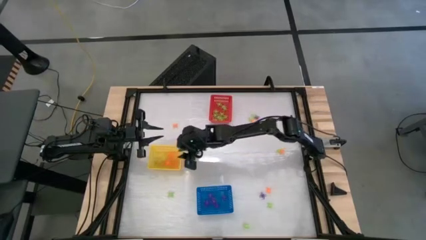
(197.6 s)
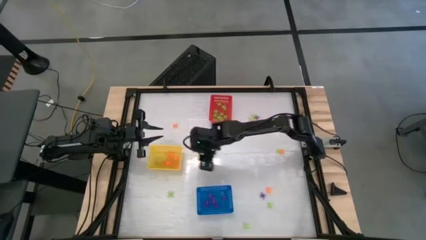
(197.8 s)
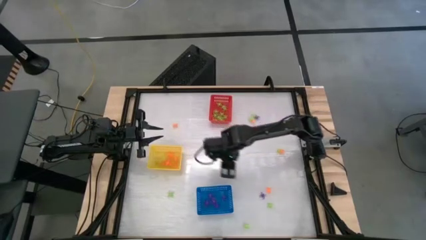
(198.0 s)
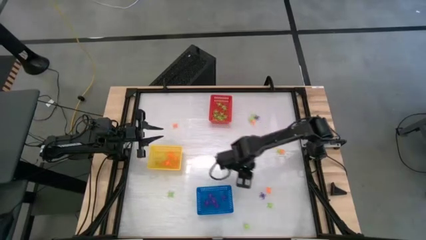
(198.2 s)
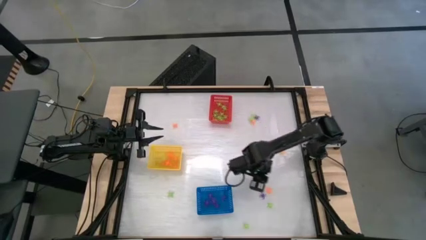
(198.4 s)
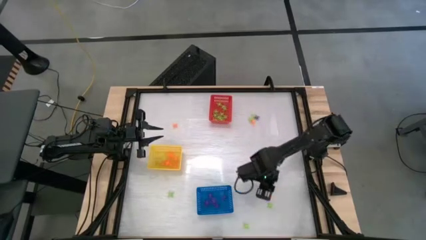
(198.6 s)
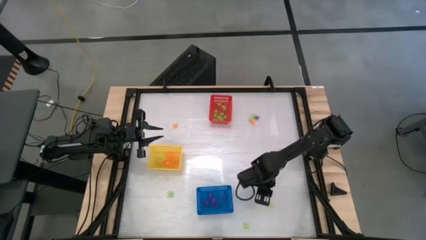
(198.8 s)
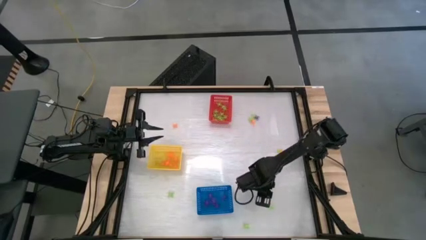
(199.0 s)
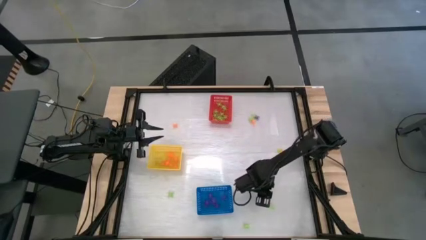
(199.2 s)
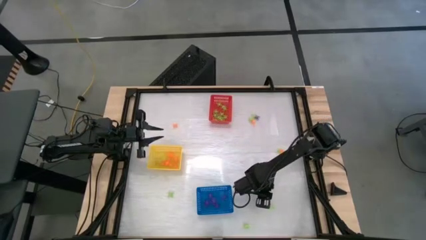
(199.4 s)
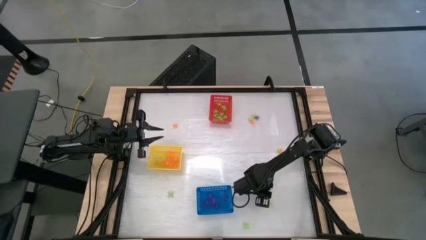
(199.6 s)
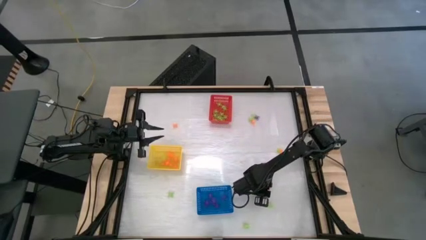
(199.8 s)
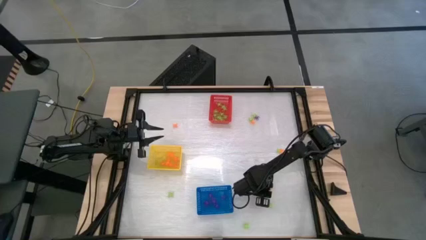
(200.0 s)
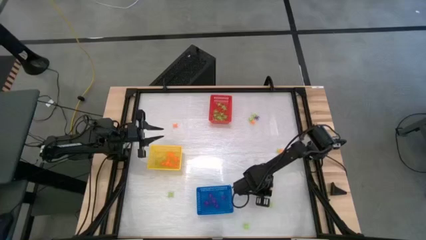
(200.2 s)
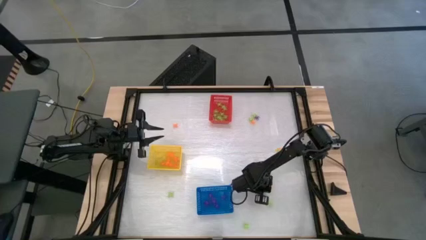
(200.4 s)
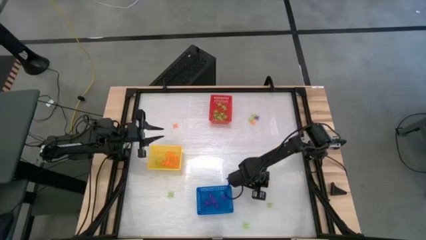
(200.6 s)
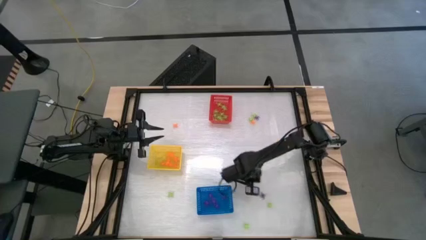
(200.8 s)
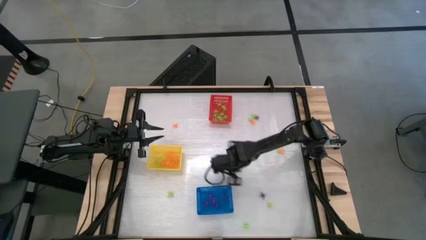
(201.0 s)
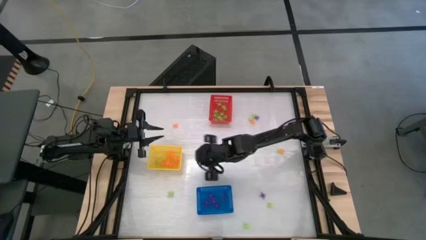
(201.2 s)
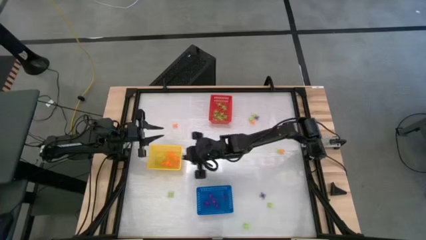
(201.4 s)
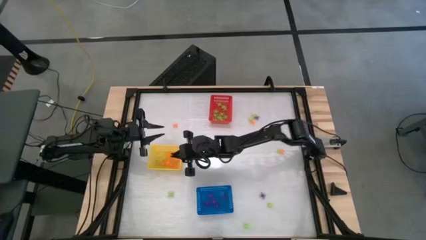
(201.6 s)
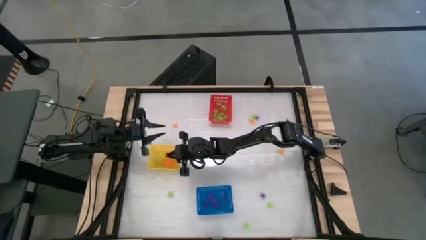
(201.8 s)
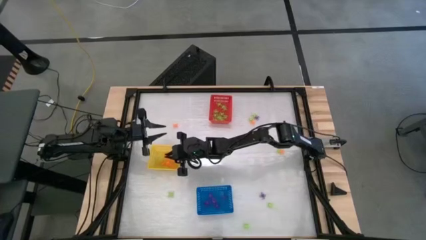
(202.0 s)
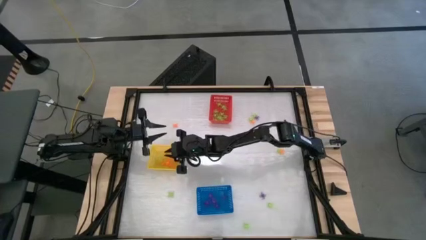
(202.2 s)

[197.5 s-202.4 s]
Task: Sort Halloween decoration
Put the orange spider toy into the yellow basket

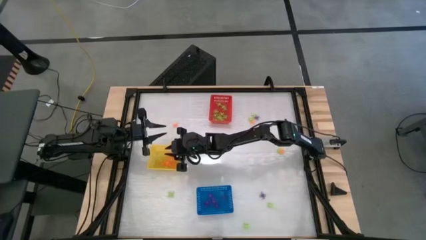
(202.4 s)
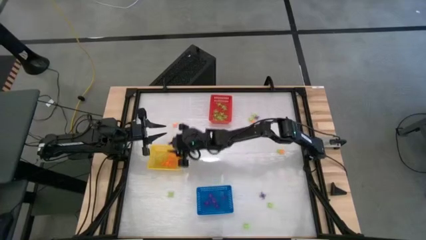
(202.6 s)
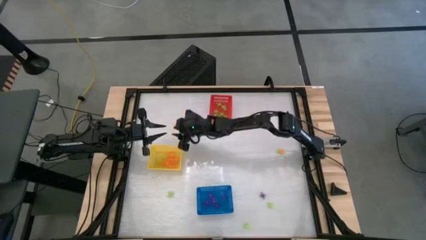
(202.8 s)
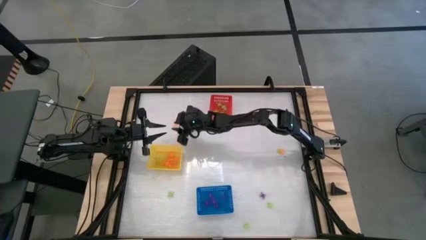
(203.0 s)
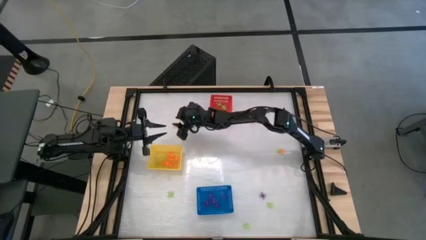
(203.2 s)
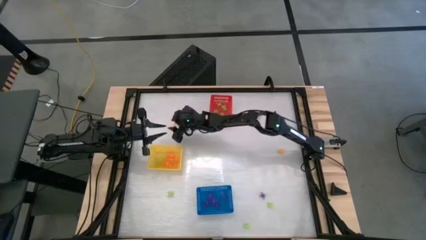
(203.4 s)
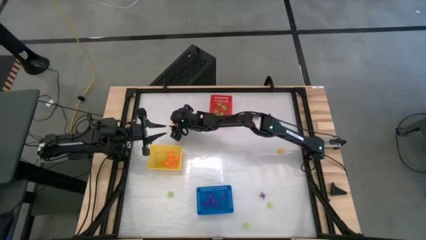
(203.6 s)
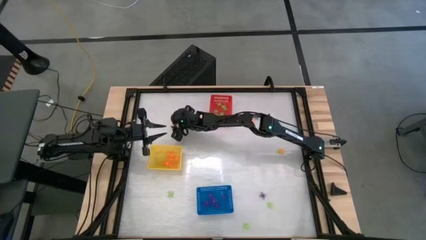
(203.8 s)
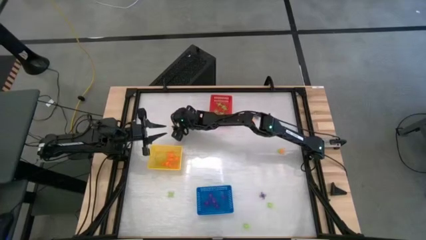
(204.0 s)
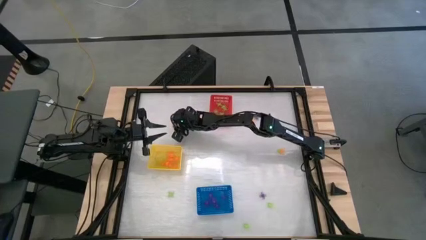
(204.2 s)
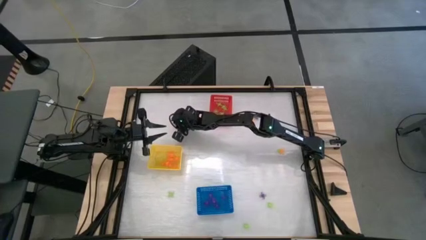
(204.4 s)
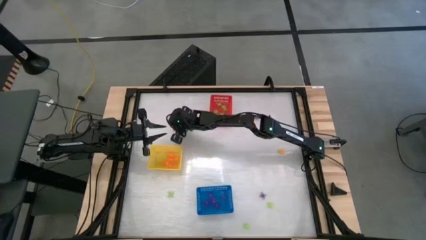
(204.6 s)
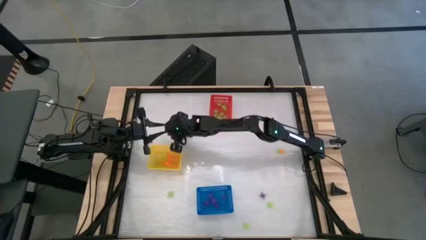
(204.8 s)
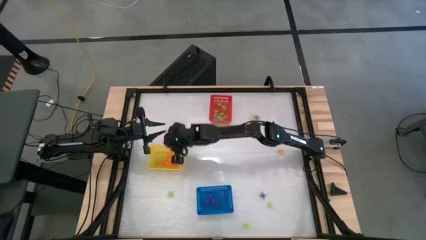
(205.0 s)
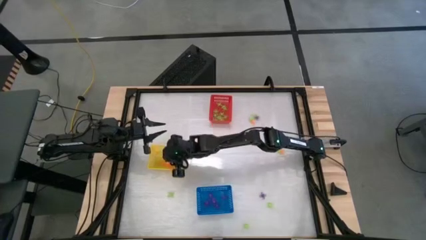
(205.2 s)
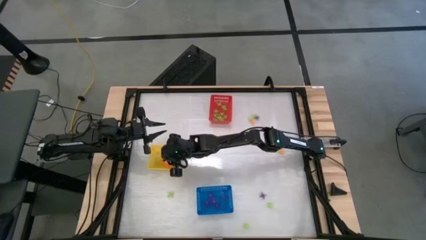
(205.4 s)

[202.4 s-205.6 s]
Put the orange spider toy into the yellow basket

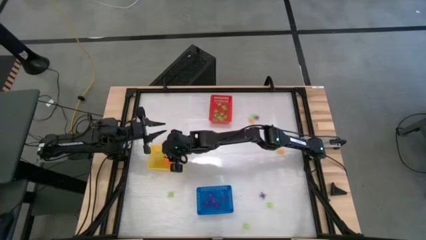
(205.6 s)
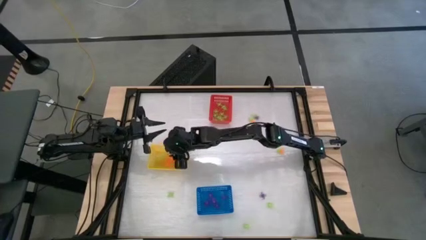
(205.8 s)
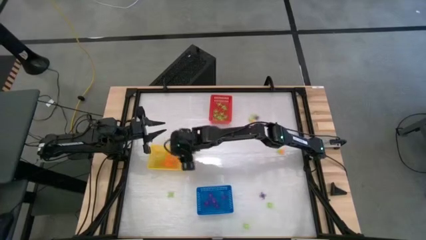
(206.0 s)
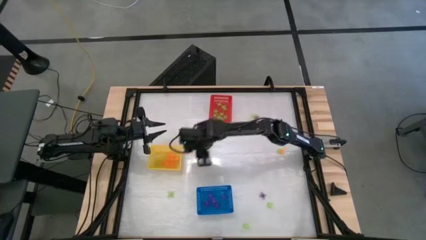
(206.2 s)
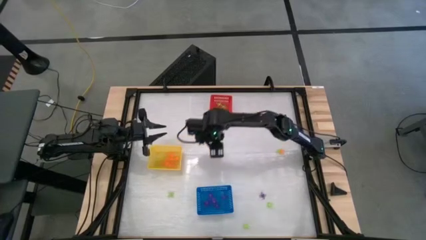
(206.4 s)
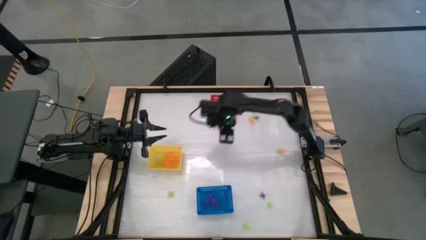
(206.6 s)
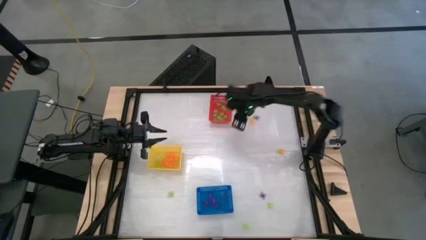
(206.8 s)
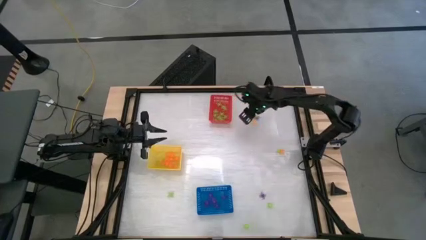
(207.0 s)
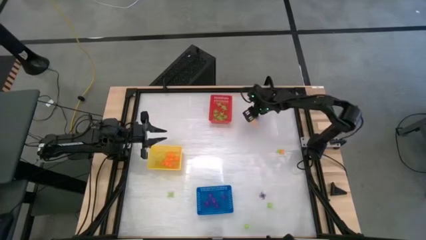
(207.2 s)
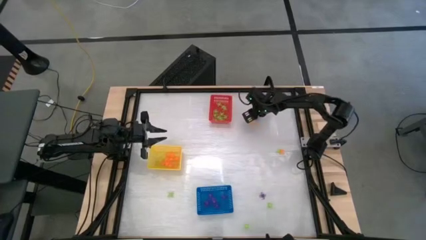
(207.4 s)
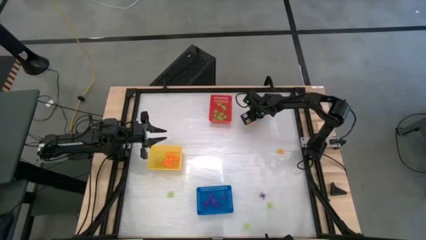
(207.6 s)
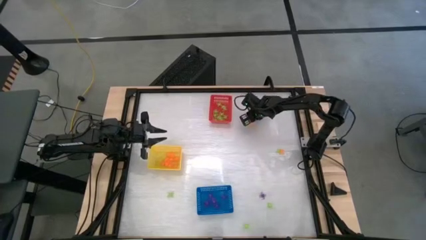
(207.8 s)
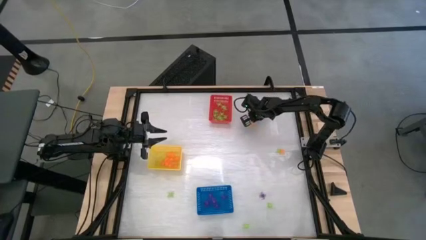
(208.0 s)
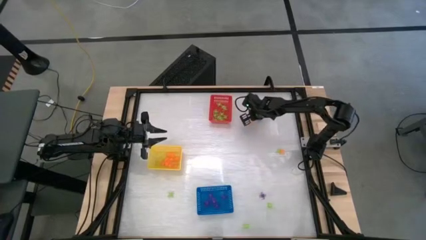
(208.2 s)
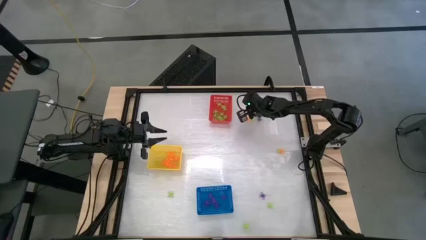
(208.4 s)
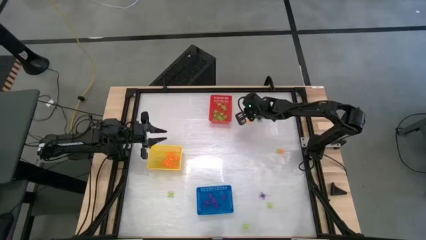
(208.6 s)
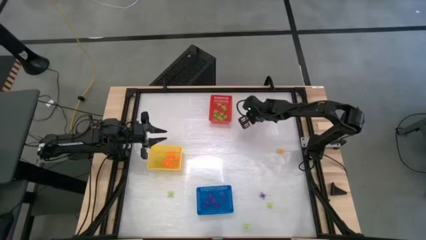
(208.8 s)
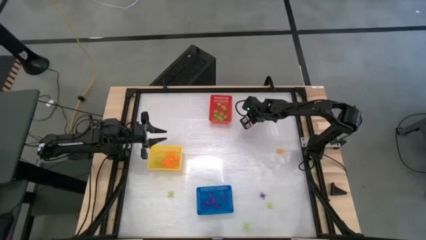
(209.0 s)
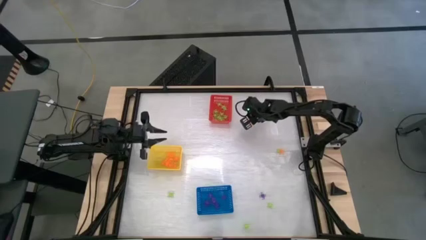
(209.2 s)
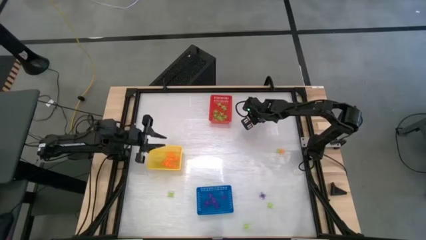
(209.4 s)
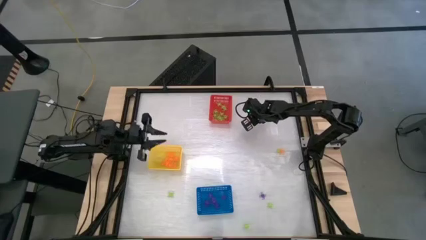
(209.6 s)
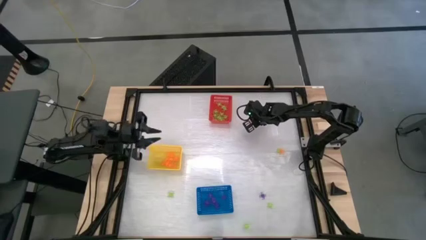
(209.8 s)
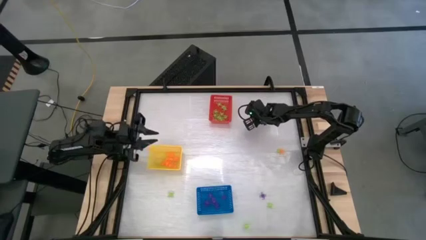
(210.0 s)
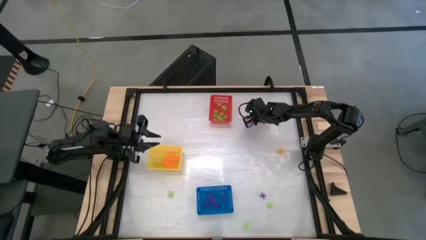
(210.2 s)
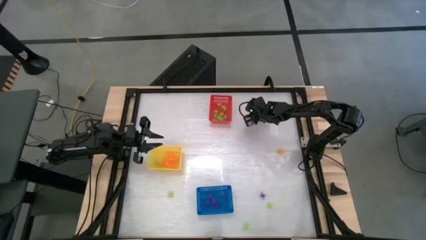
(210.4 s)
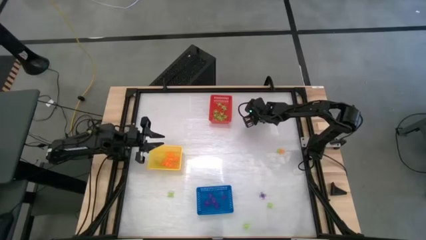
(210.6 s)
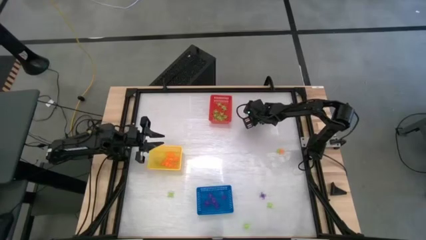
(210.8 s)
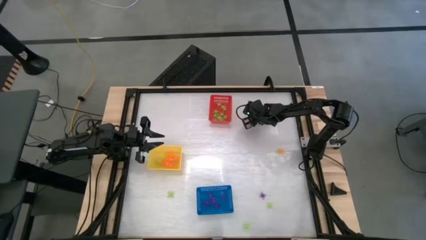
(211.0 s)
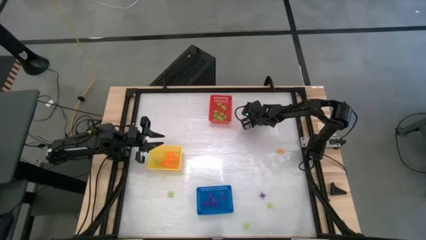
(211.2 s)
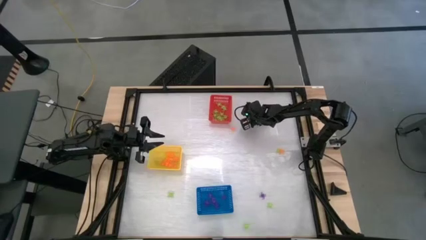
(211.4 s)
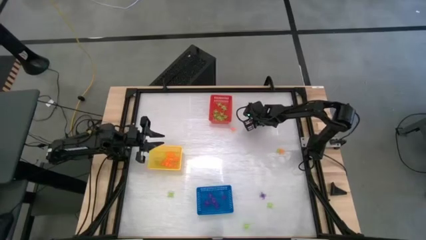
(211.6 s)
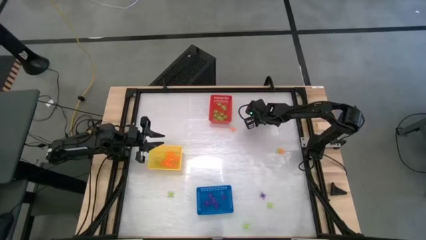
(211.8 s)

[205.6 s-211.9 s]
Put the green spider toy into the red basket

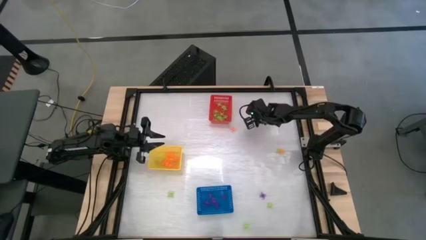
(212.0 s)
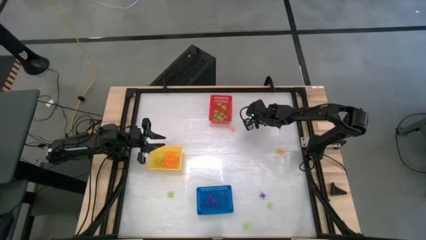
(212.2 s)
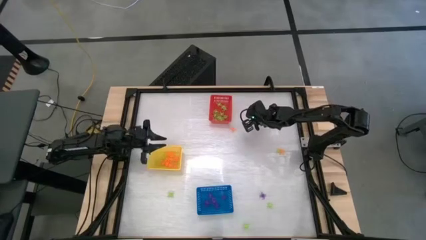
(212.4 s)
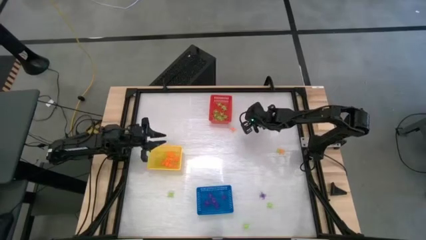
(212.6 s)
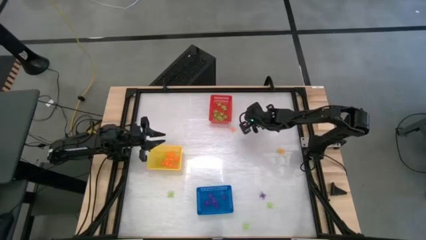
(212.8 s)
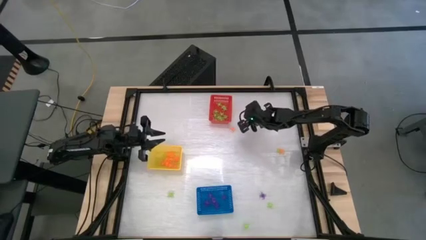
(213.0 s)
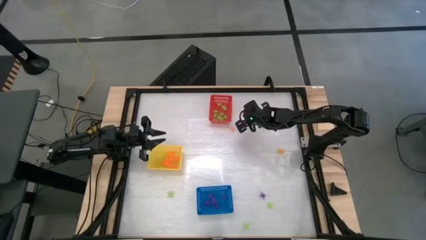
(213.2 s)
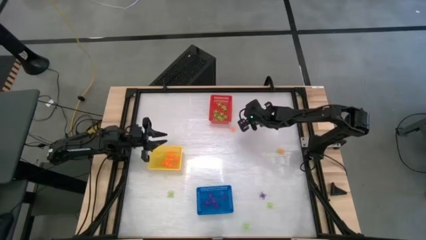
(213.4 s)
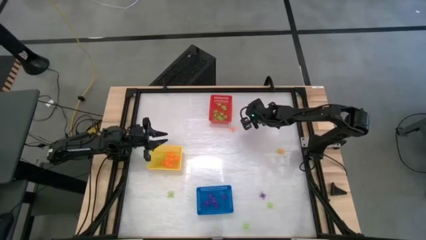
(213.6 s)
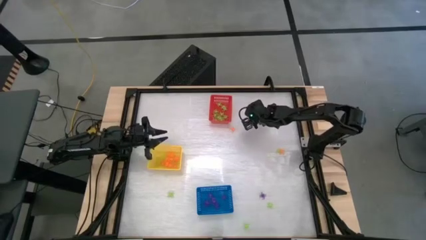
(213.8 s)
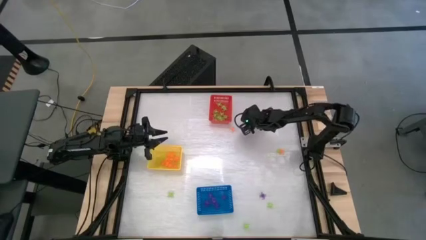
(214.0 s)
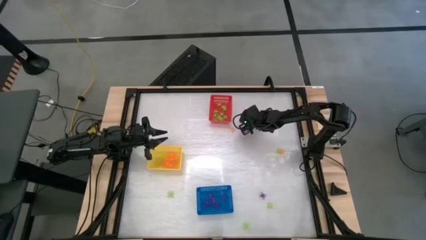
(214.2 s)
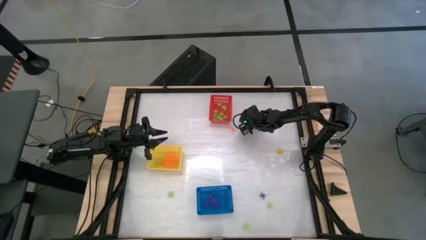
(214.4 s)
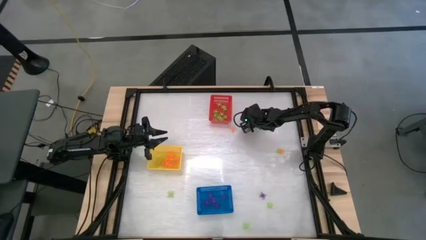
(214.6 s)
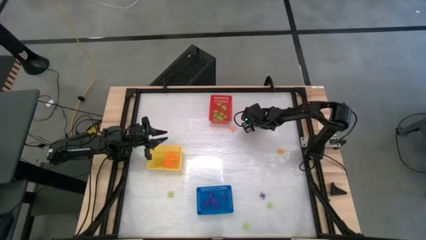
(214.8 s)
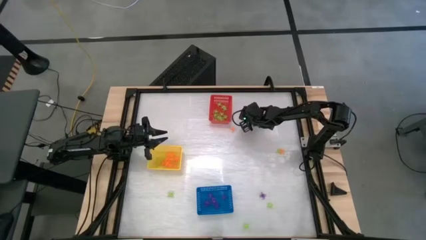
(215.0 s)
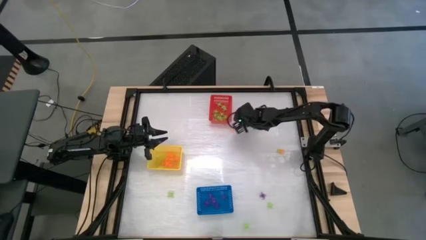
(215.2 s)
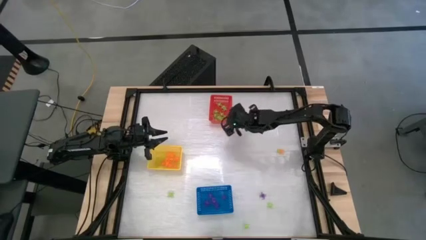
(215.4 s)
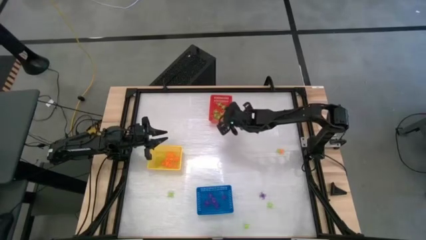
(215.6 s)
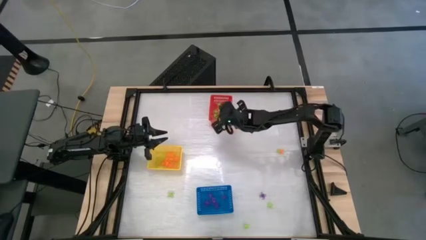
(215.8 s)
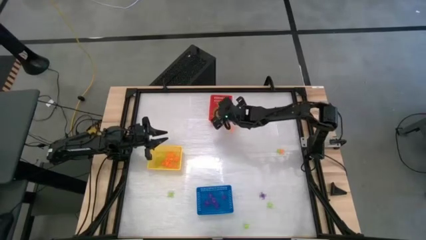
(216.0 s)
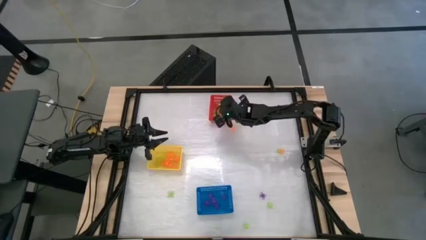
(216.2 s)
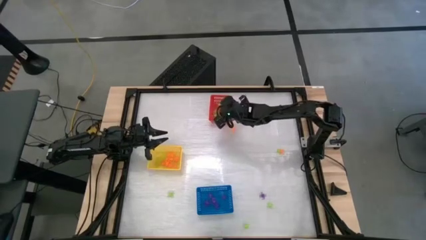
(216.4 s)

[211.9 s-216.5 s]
Put the green spider toy into the red basket
